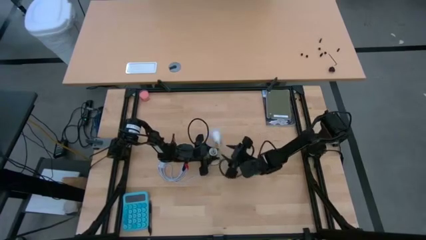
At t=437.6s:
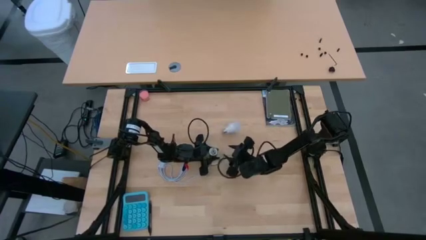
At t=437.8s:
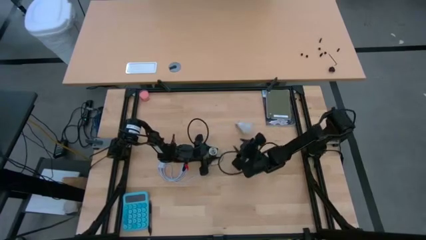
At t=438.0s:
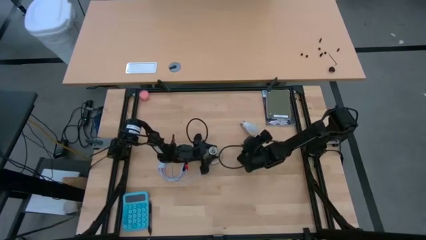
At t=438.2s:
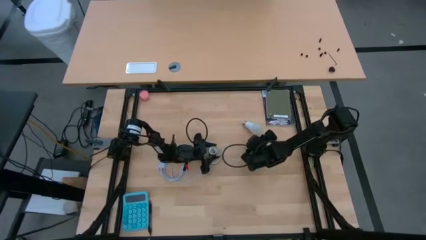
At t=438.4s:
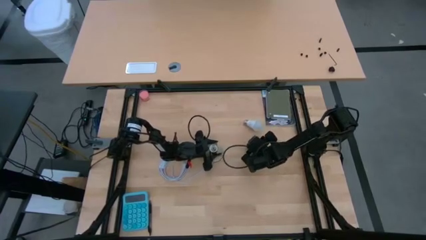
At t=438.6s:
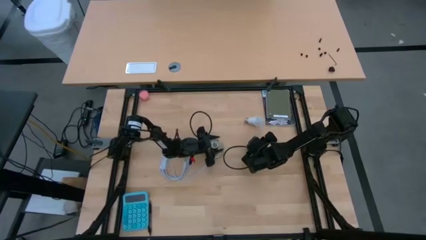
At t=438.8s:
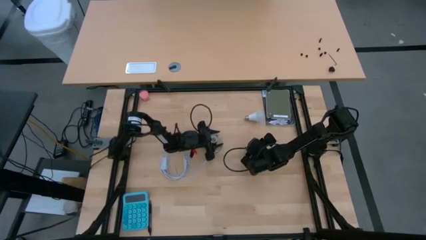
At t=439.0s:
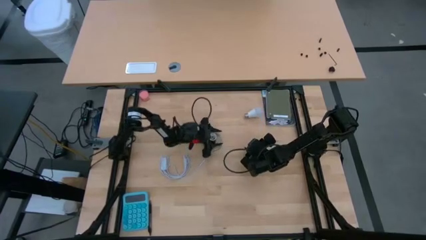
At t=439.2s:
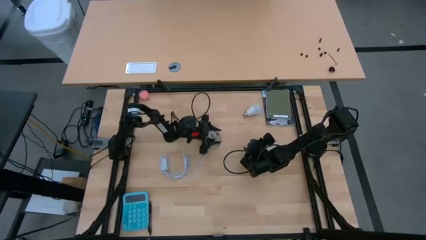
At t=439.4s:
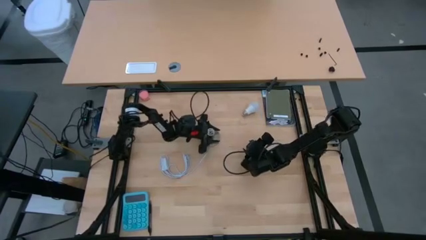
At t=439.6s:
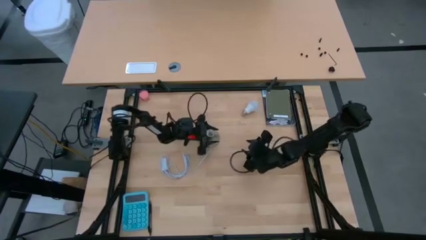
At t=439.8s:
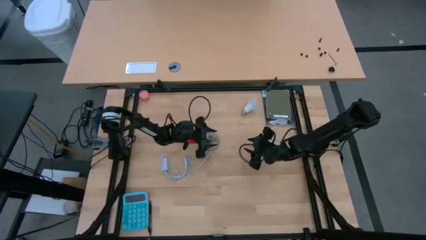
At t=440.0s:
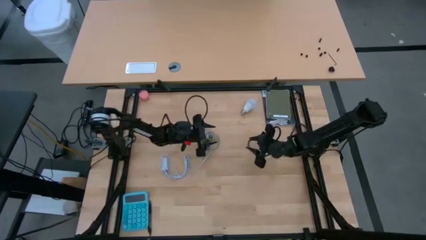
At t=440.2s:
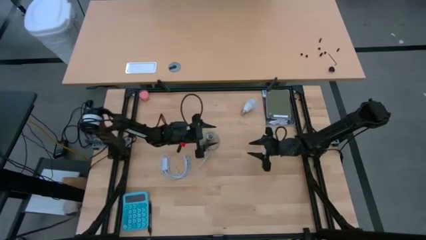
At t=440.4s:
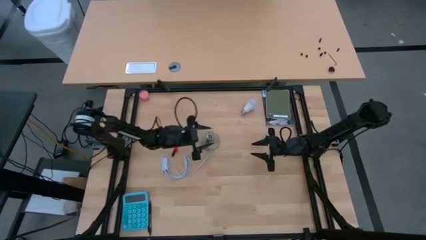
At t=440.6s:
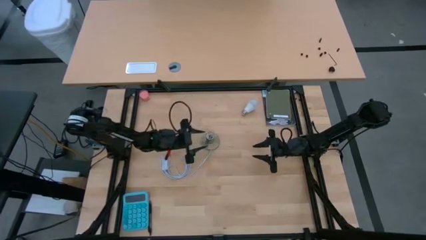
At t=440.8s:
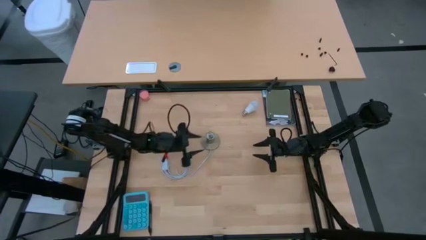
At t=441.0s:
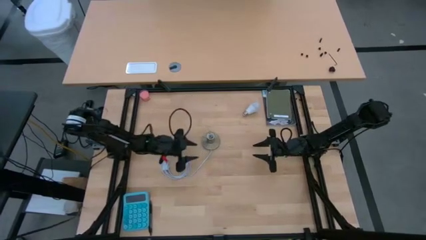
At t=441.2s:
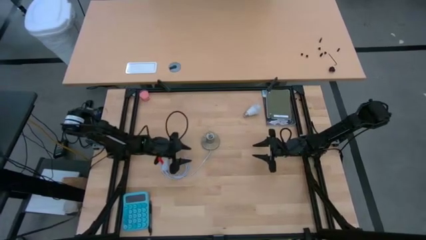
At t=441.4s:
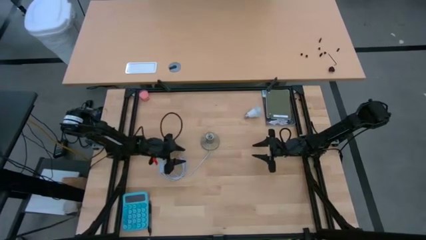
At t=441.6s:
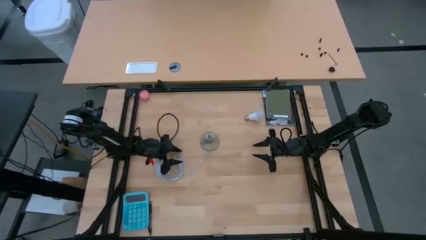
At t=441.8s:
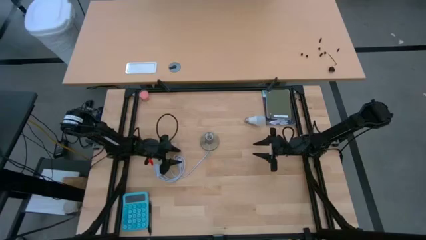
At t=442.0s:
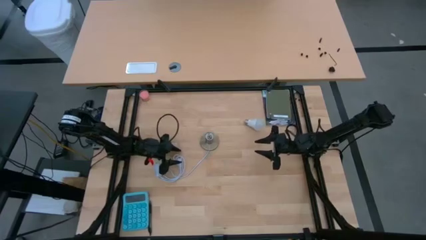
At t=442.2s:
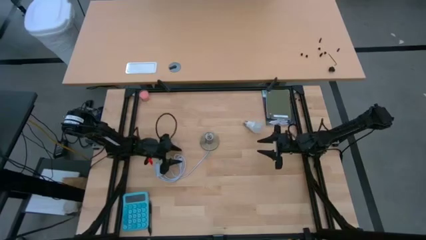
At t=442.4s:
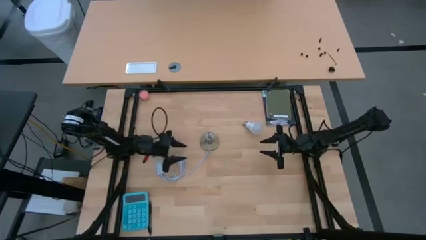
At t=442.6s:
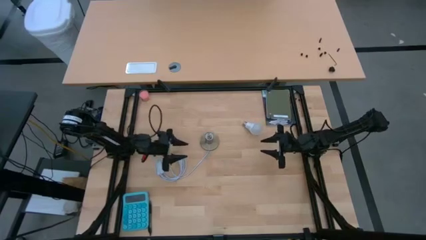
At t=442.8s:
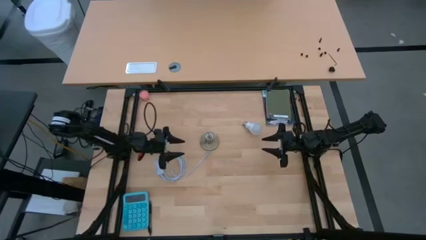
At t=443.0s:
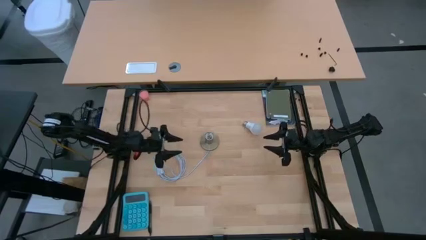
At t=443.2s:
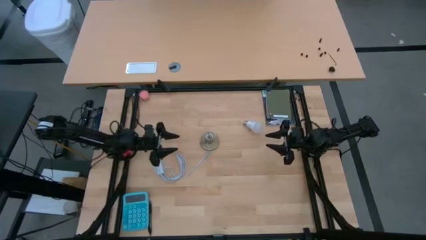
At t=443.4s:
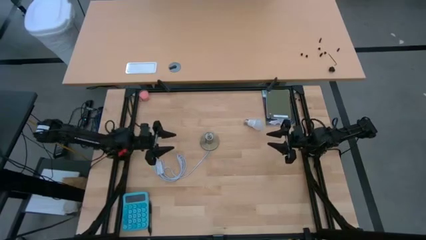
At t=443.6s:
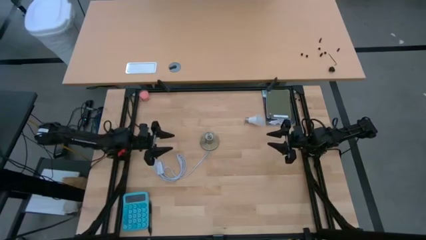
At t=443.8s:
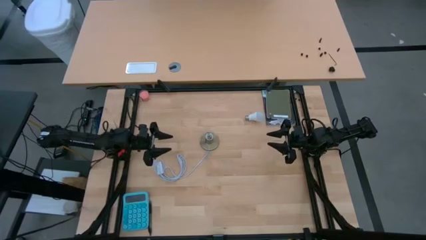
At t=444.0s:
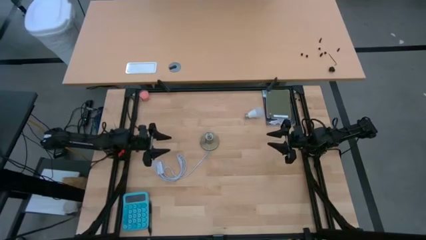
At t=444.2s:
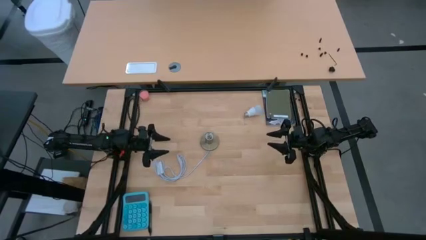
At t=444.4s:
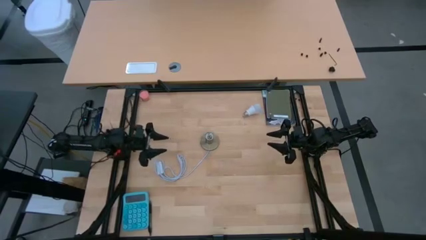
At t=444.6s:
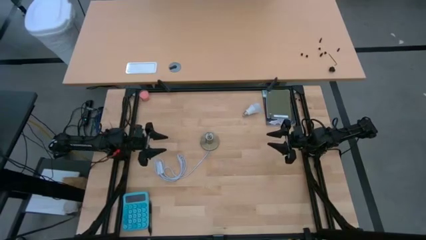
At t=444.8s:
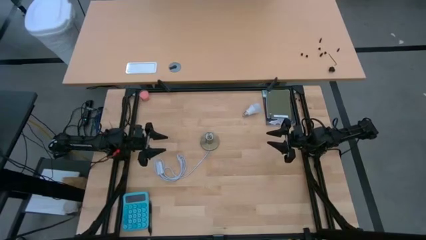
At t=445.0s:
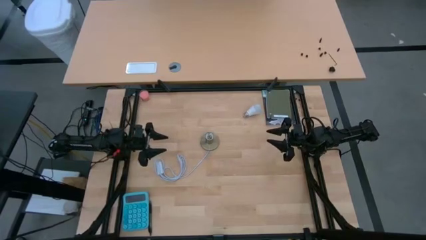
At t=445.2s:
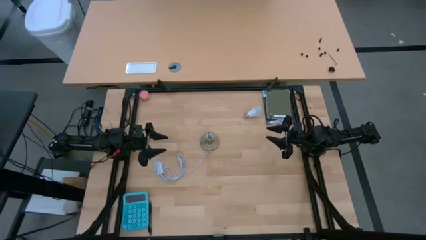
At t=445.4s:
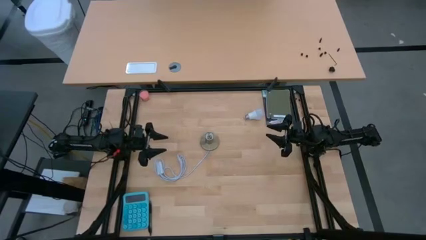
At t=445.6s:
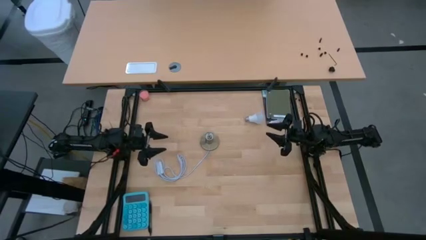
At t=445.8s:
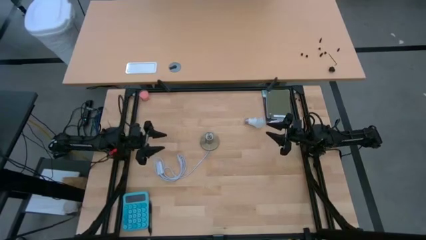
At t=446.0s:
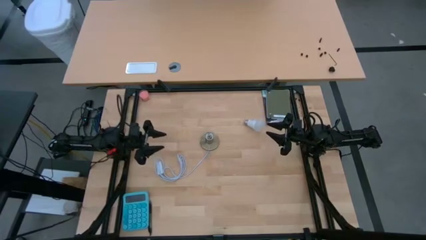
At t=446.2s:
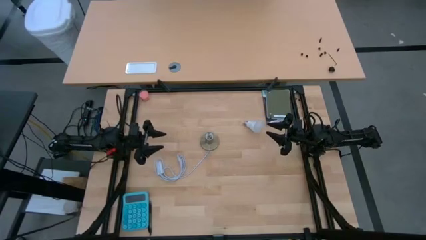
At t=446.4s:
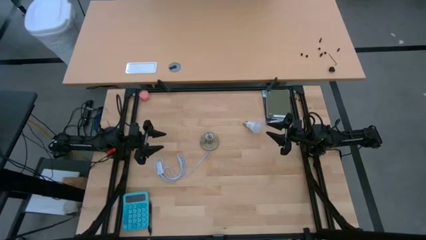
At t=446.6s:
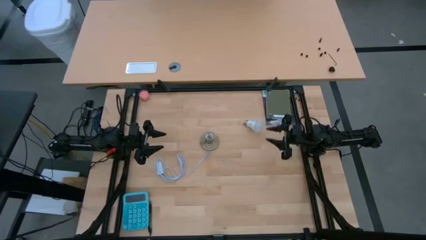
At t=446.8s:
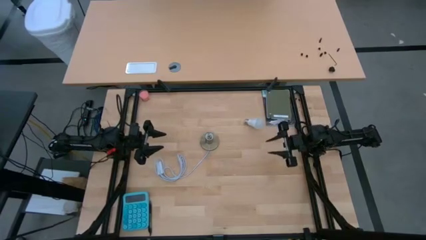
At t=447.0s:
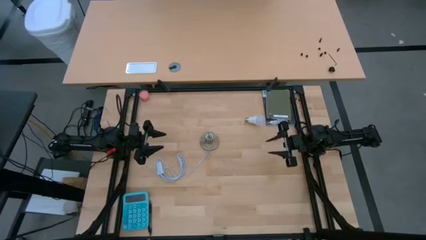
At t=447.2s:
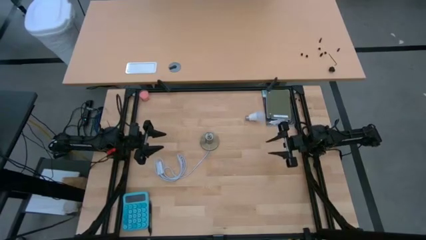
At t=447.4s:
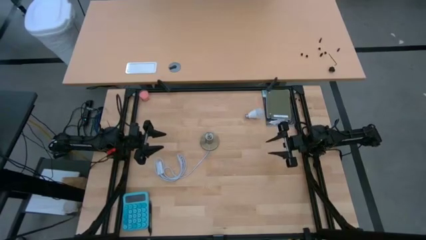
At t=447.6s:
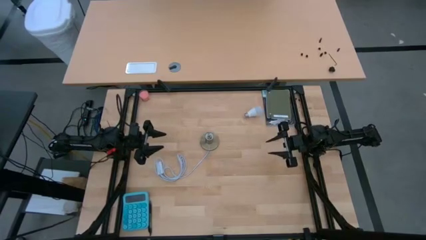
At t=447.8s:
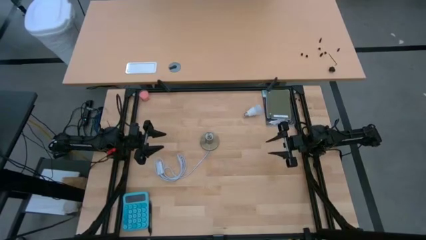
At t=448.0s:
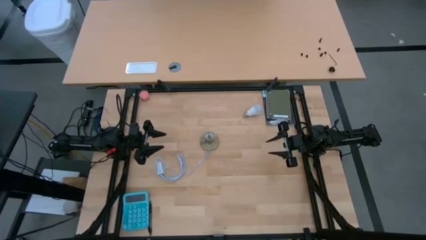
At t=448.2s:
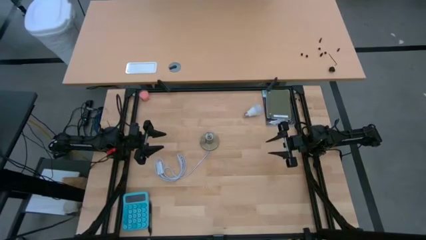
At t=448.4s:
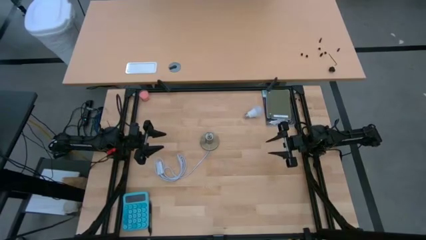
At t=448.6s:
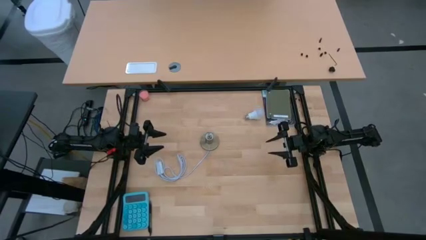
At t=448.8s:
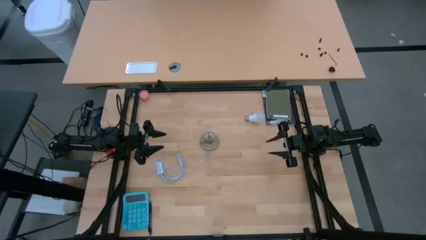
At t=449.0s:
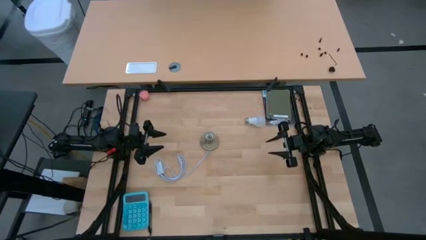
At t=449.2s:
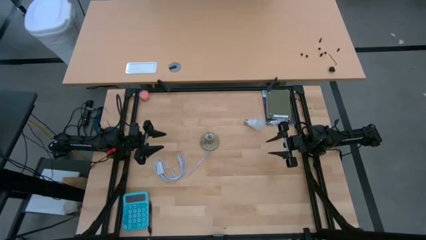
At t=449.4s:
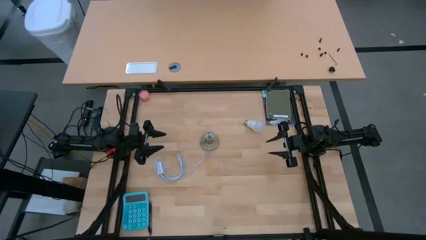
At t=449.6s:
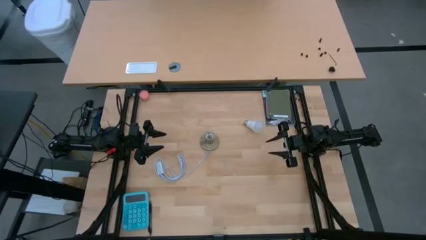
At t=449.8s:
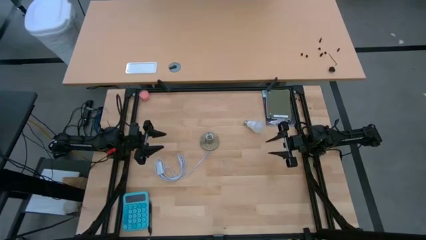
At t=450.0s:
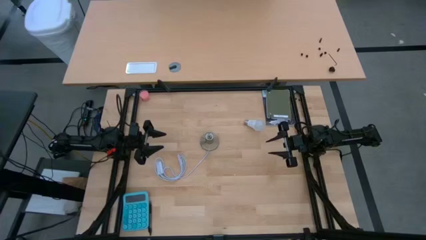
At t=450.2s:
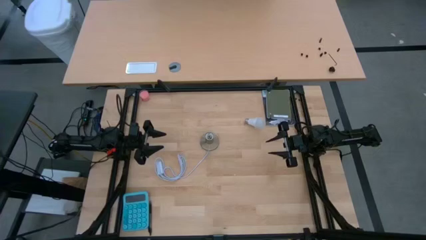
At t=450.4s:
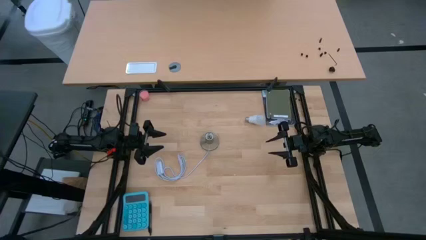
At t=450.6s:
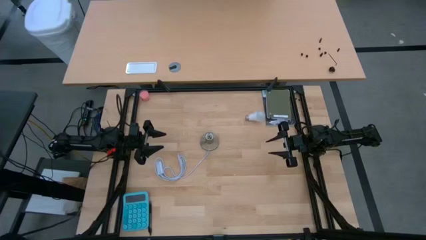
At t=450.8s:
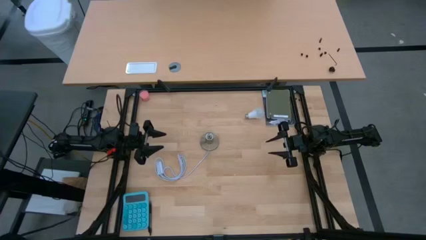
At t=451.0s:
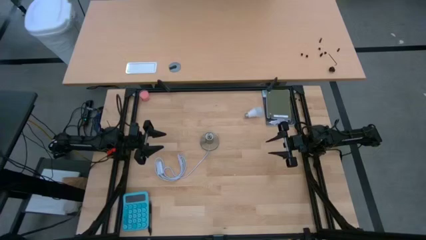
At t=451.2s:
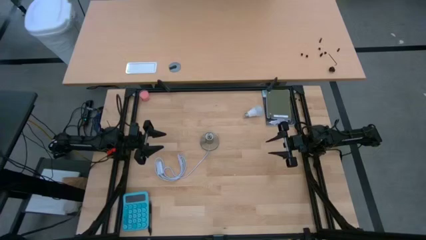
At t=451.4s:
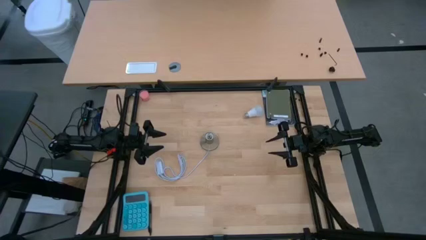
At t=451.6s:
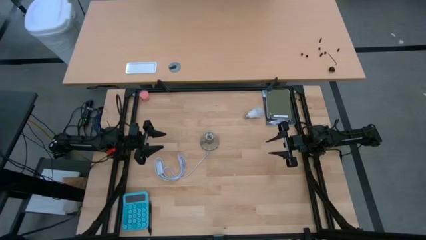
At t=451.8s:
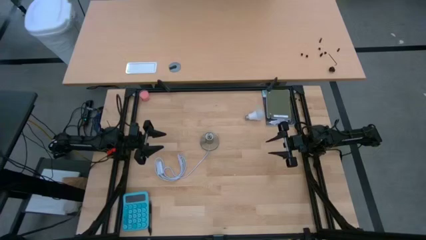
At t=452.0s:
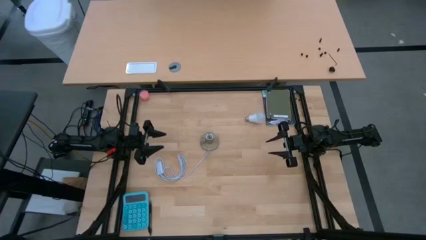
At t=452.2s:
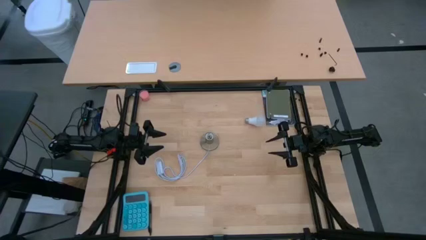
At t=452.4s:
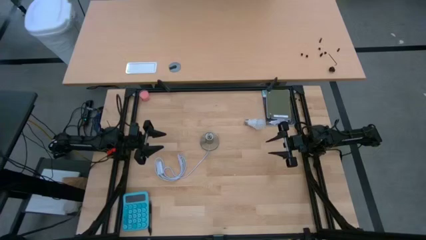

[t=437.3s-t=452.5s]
Task: Screw lightbulb
Return to home position

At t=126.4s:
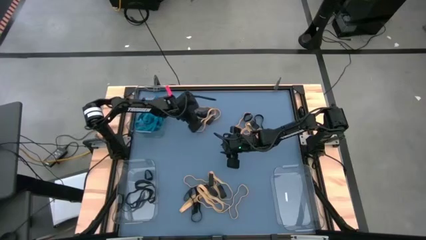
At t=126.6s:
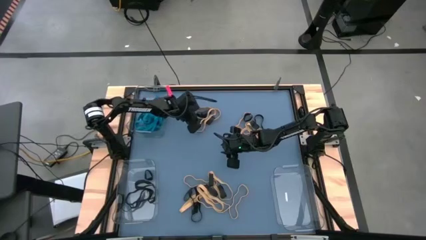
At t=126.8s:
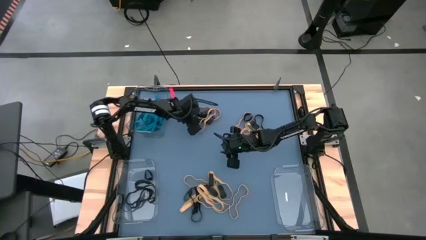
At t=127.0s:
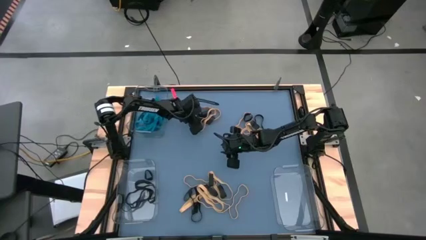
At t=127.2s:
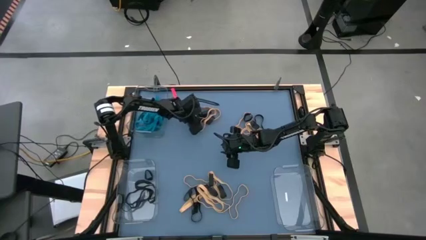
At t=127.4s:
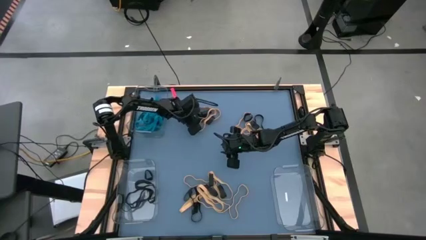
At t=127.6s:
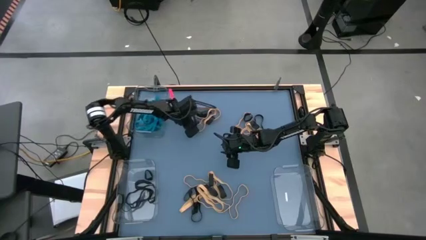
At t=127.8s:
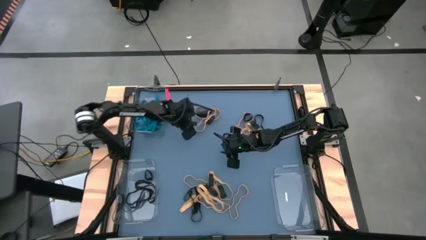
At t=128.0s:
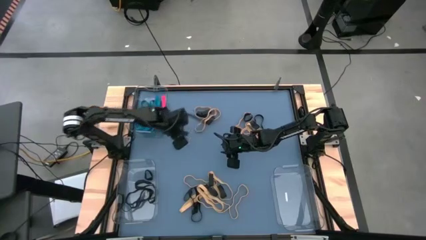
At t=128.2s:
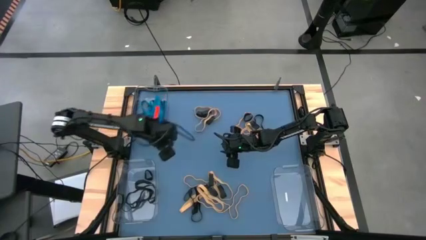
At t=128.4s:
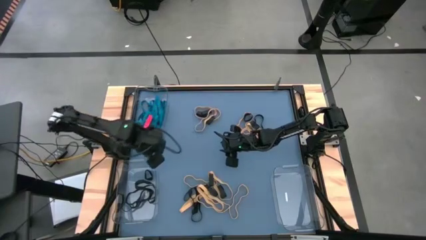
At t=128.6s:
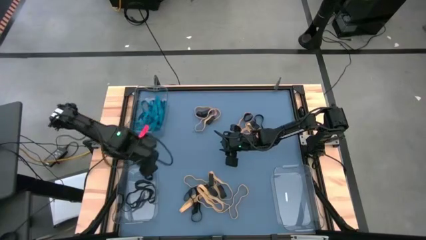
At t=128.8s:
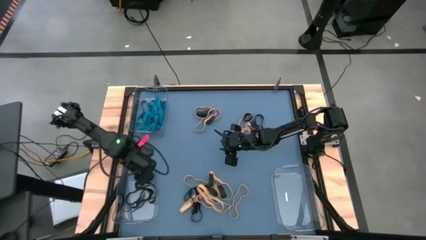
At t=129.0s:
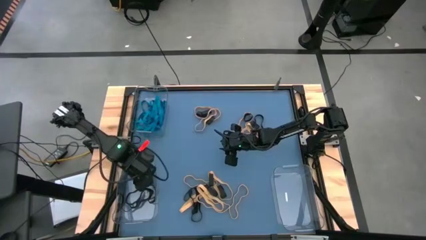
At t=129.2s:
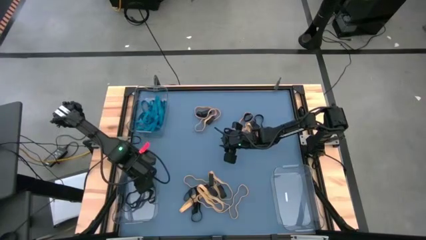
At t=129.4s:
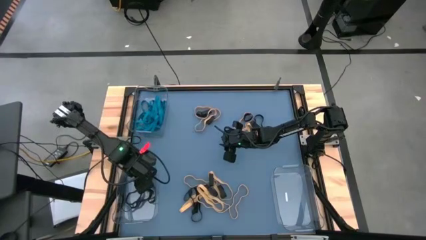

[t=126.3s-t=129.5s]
Task: Sort rubber bands into baskets
Put the black rubber band into the bottom left transparent bin
